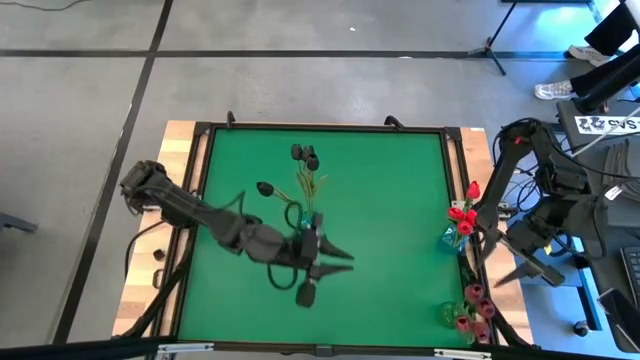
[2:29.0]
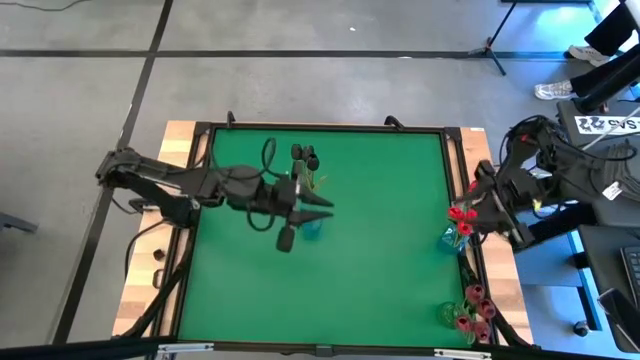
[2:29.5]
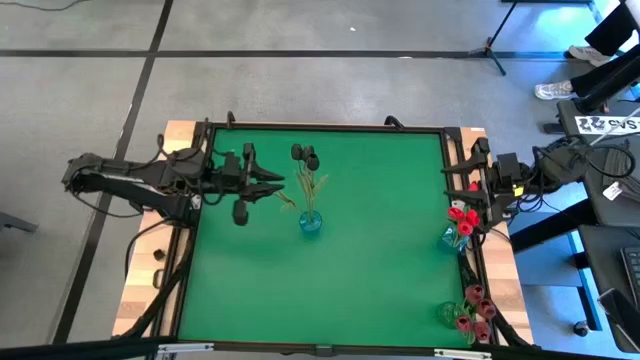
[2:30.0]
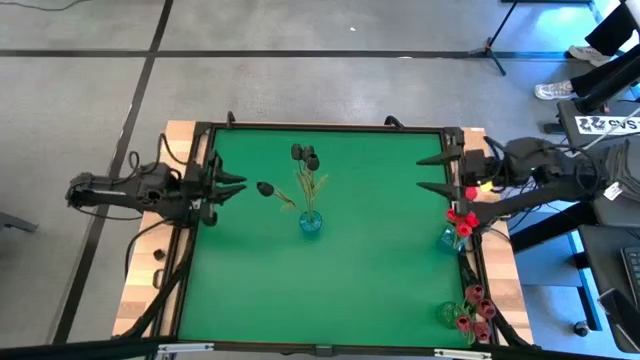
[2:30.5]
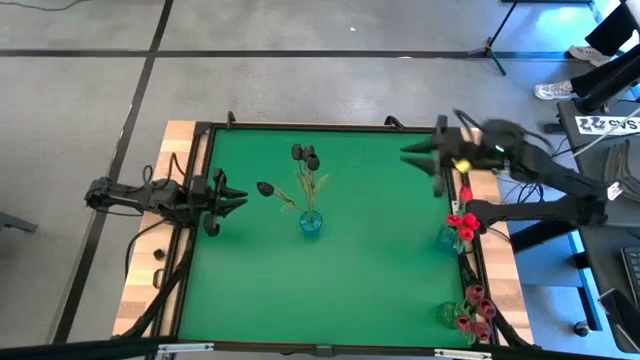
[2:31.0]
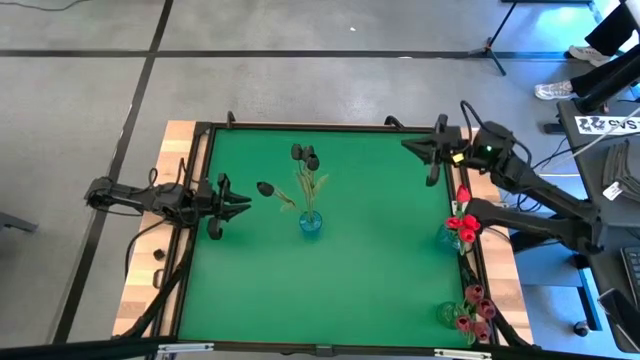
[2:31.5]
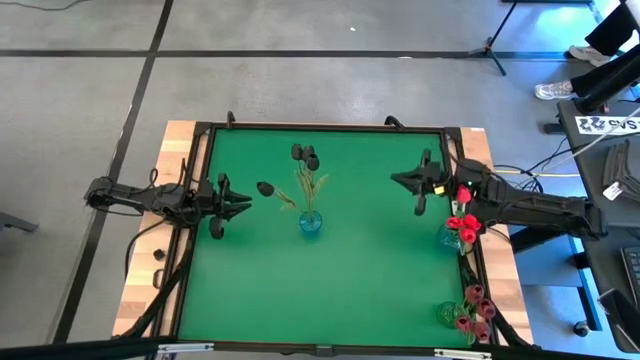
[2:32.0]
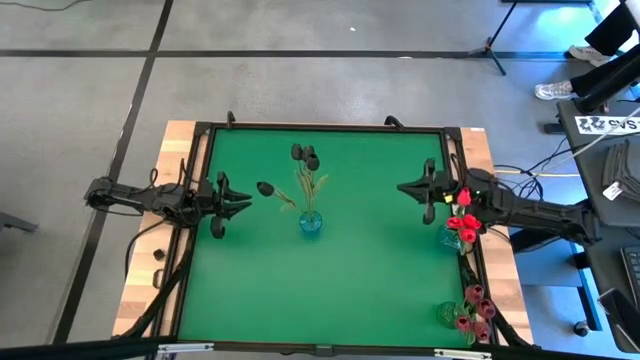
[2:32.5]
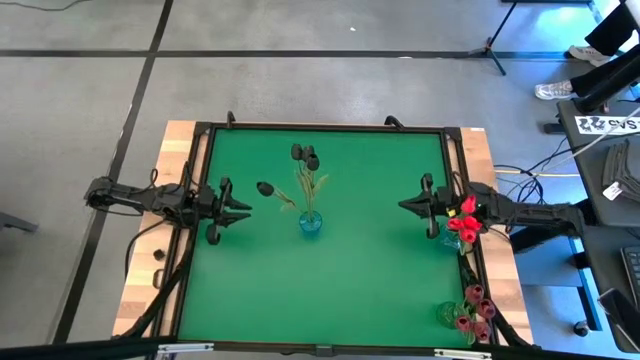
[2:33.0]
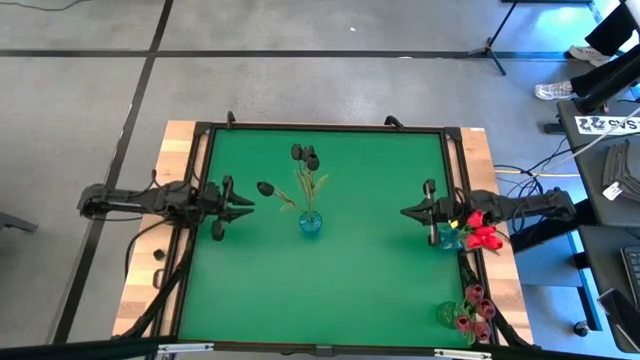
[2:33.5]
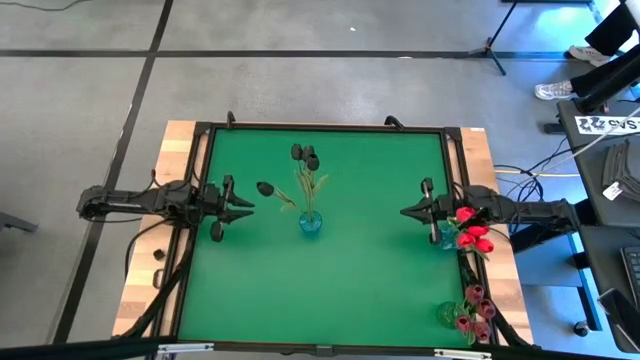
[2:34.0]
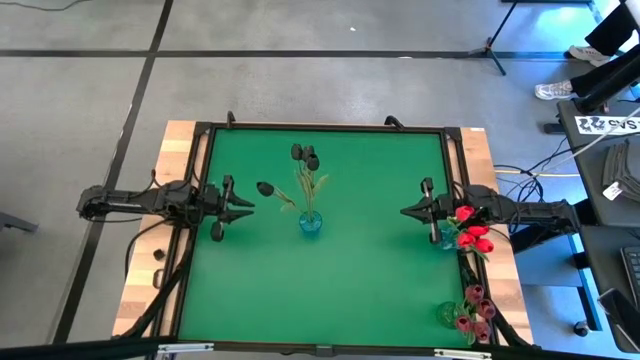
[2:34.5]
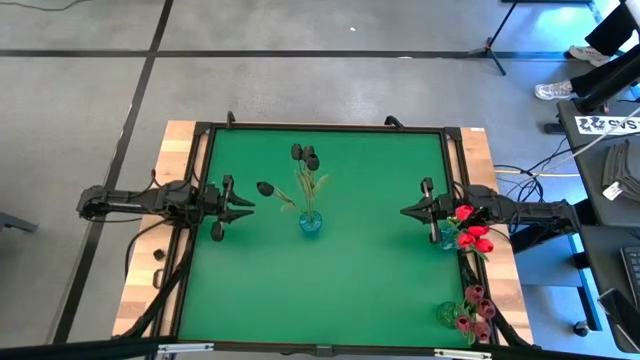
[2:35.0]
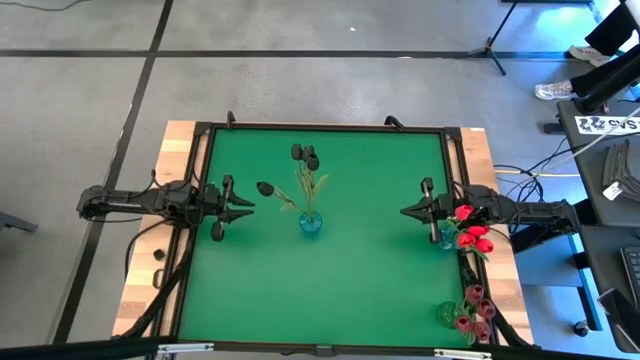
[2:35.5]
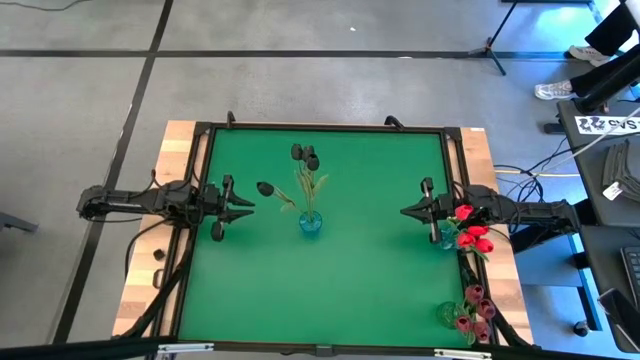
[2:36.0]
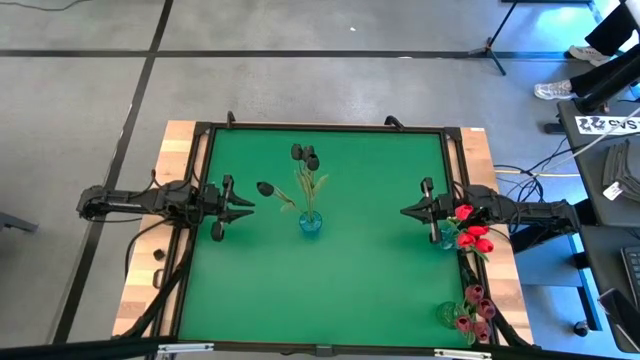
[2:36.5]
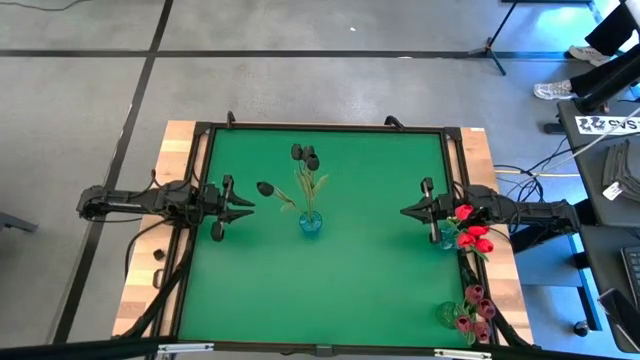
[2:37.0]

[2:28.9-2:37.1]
Task: Sort flowers into vase by color
Return to Home Position

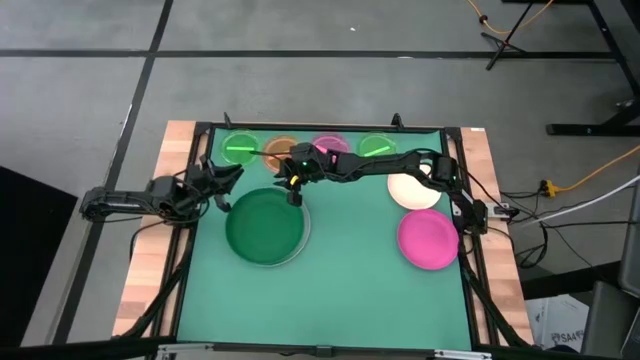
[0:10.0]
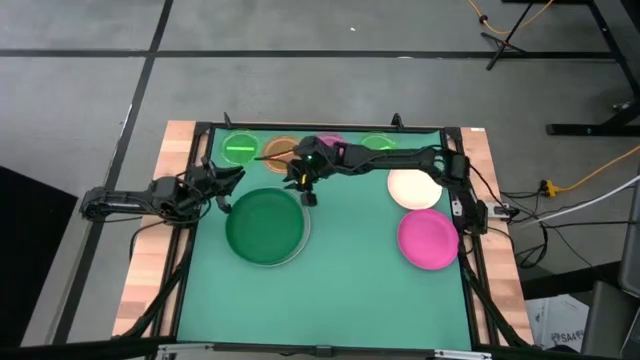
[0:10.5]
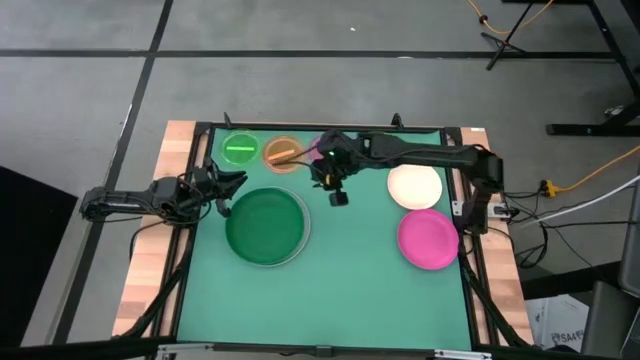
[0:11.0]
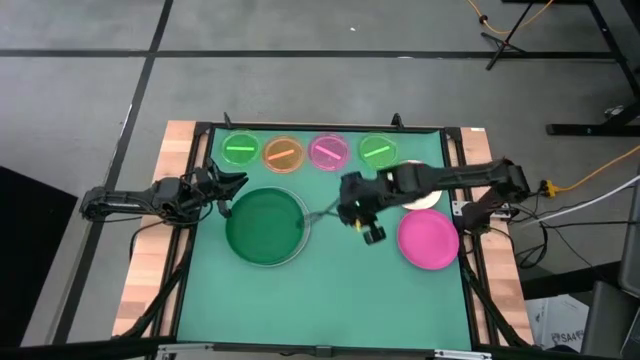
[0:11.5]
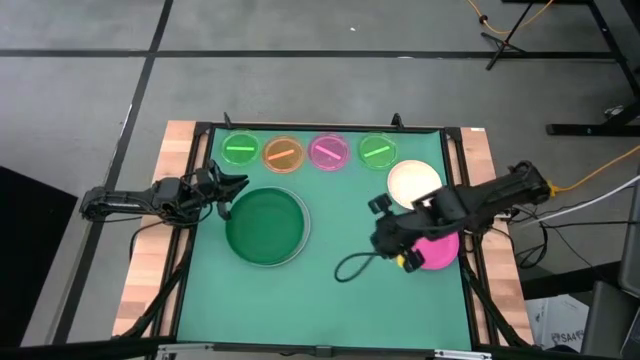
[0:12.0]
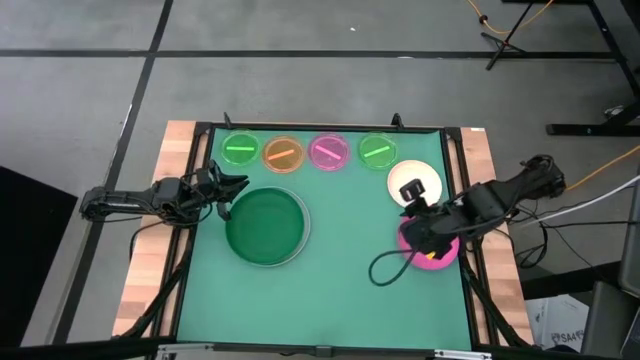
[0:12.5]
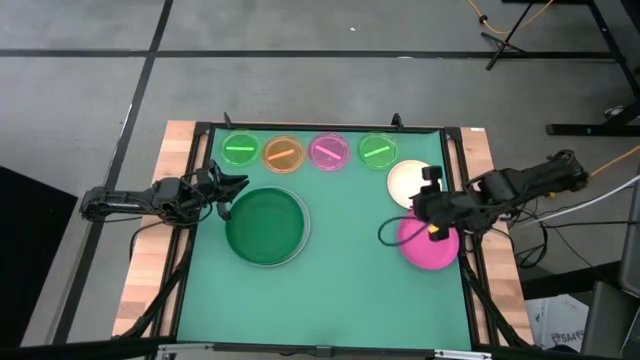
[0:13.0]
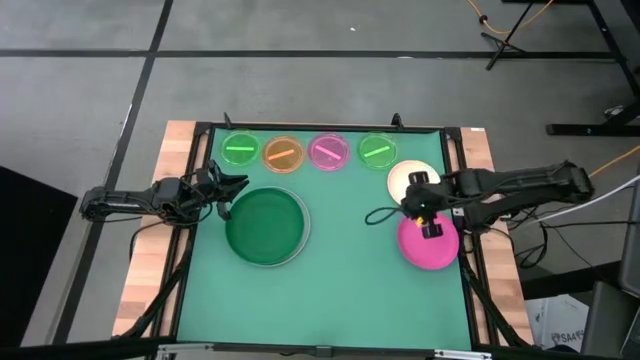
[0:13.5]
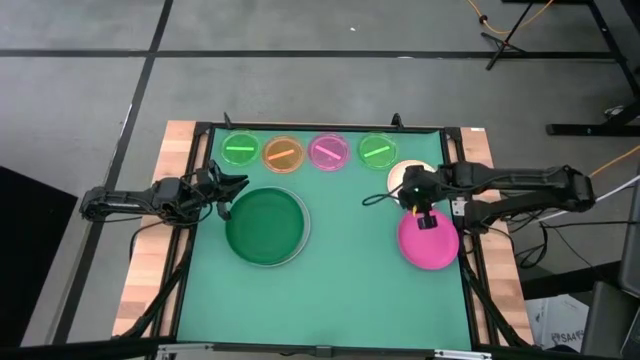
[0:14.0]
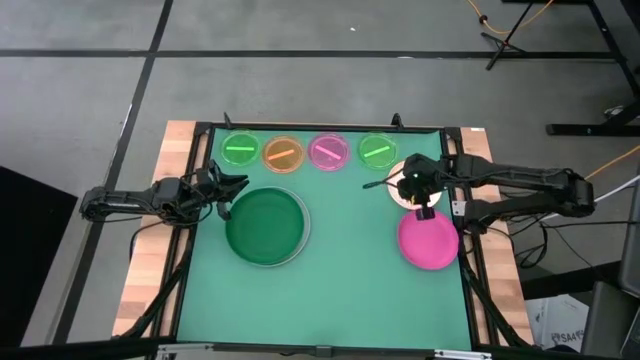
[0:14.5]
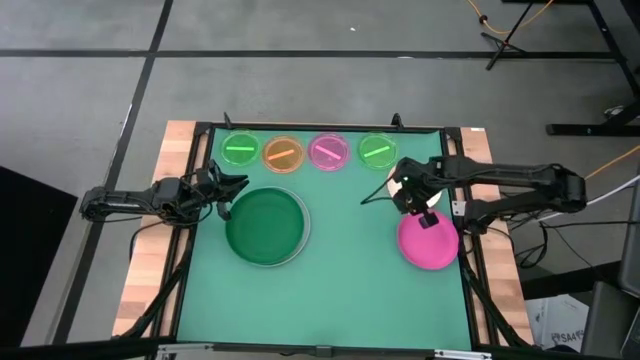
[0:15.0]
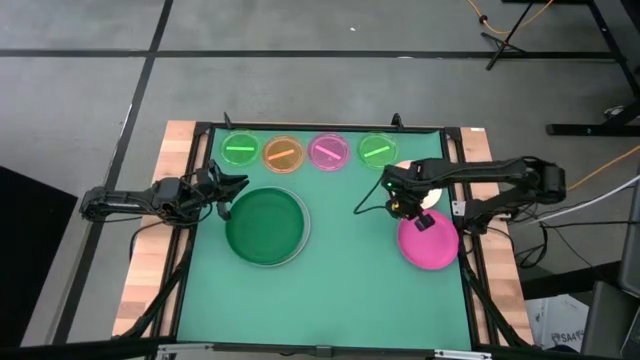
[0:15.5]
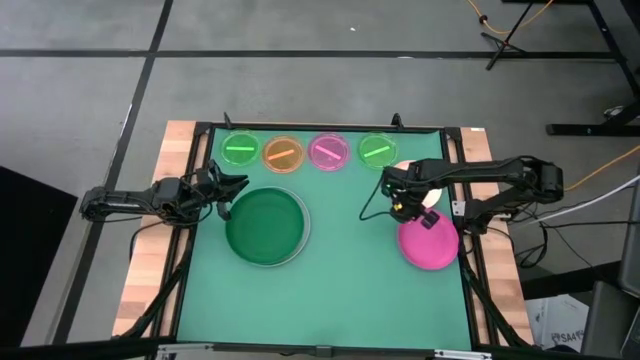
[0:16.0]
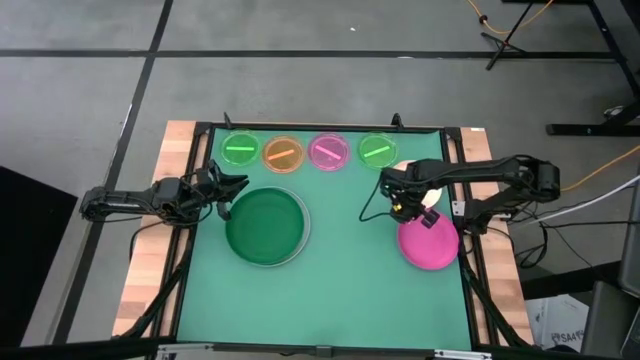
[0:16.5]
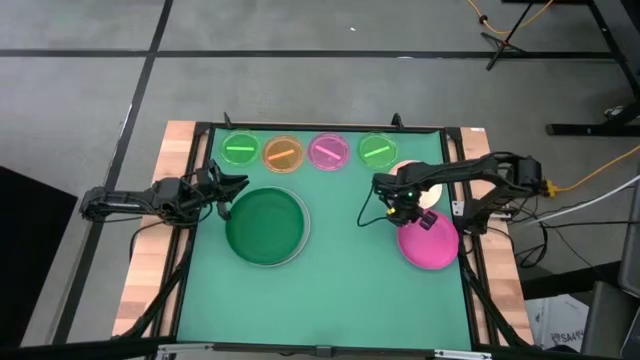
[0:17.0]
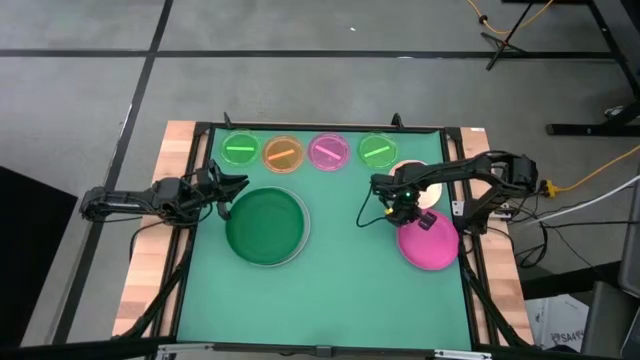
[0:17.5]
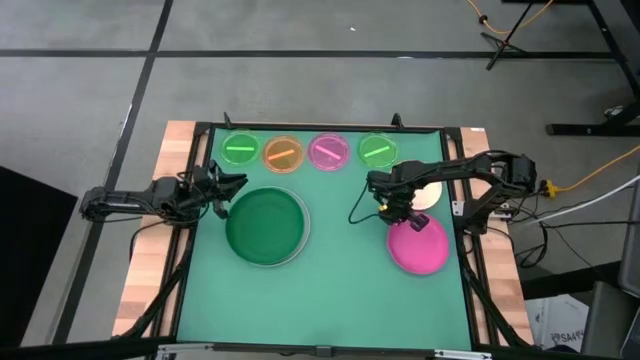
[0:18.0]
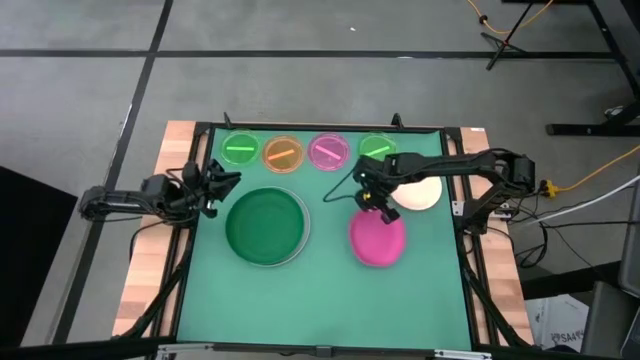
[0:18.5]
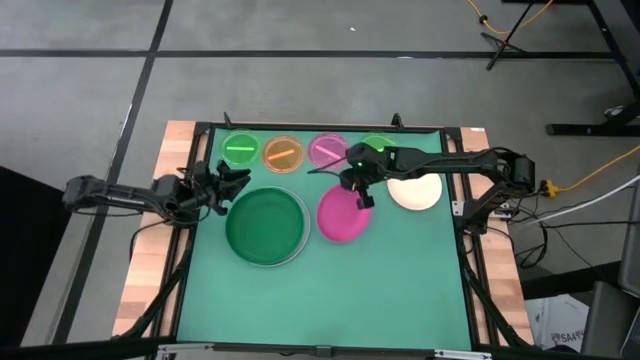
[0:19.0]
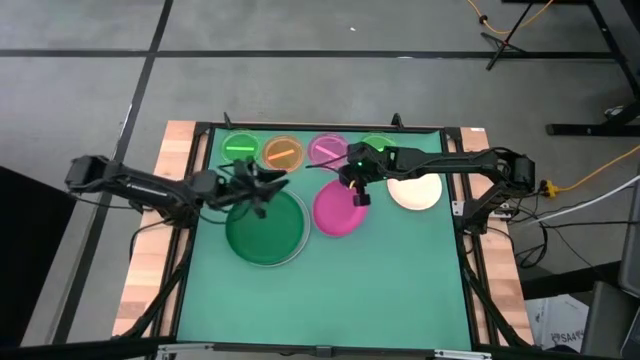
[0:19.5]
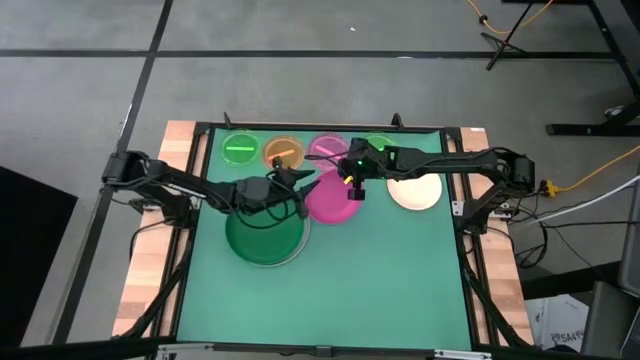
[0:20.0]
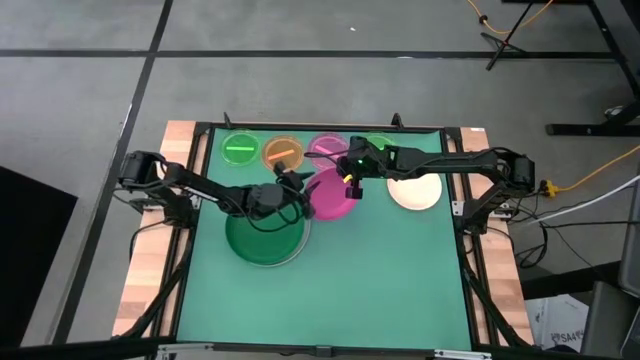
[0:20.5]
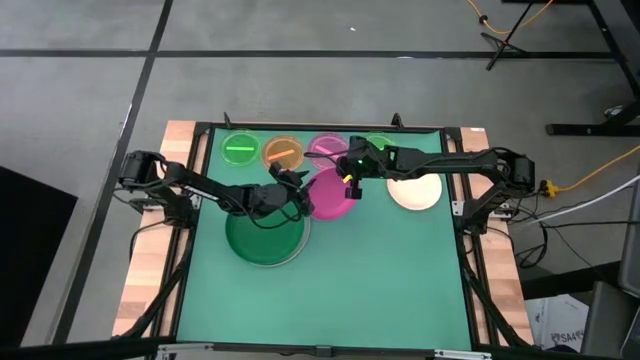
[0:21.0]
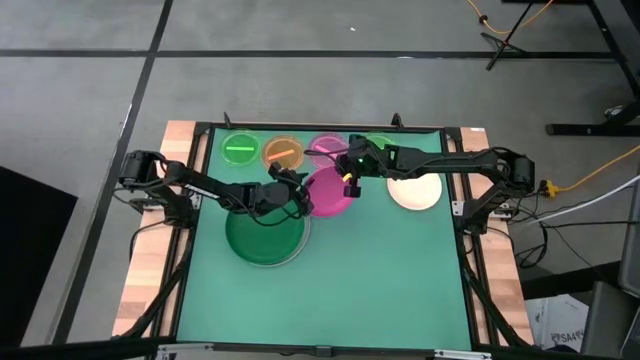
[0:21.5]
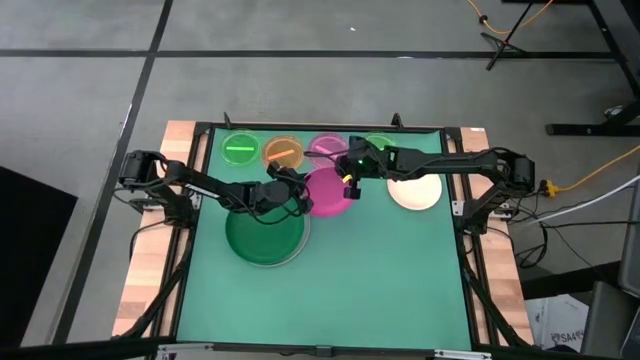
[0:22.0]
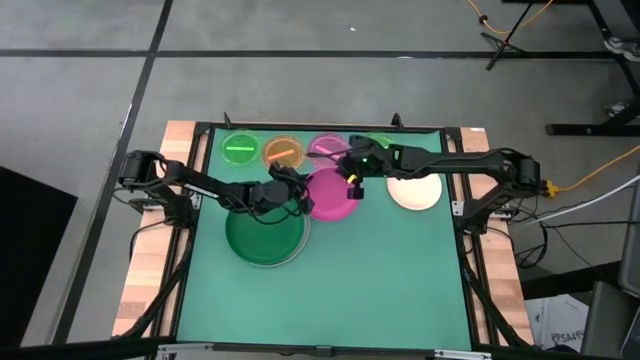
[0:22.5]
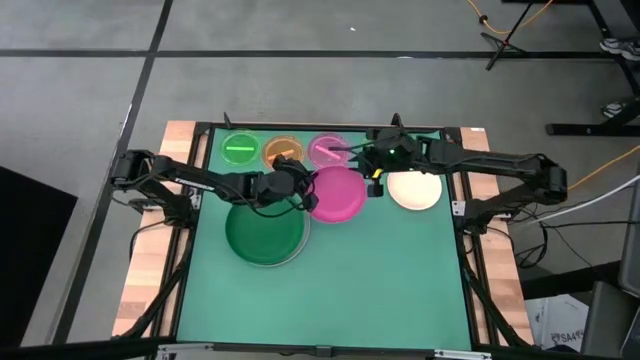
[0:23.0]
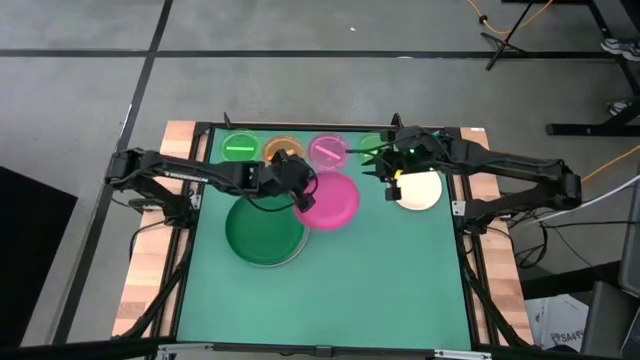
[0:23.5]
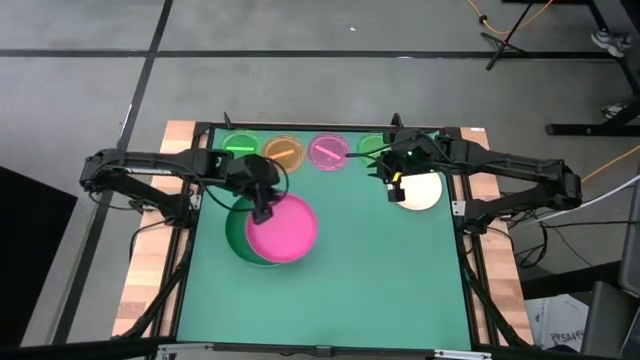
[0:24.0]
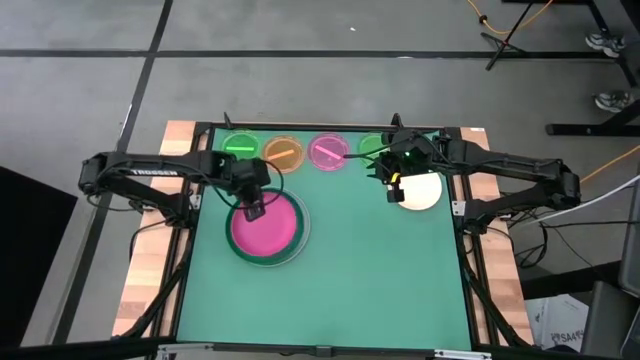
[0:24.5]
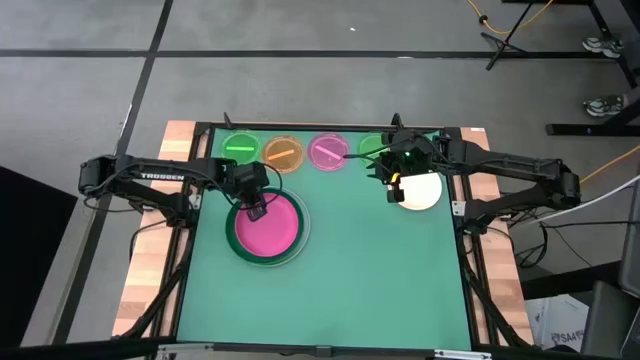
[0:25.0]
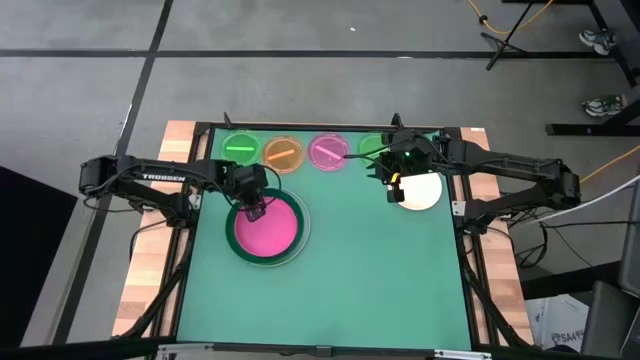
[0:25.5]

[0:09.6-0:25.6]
Task: Stack plastic plates
Stack the pink plate on top of the the green plate
